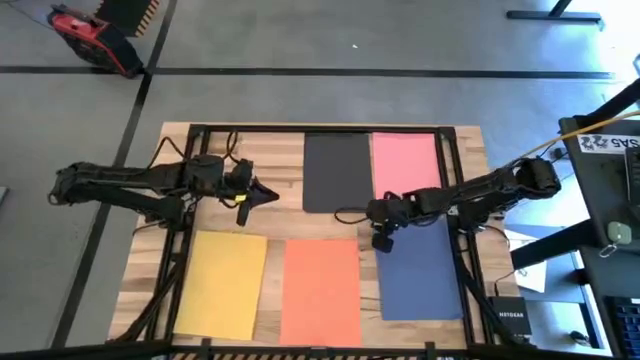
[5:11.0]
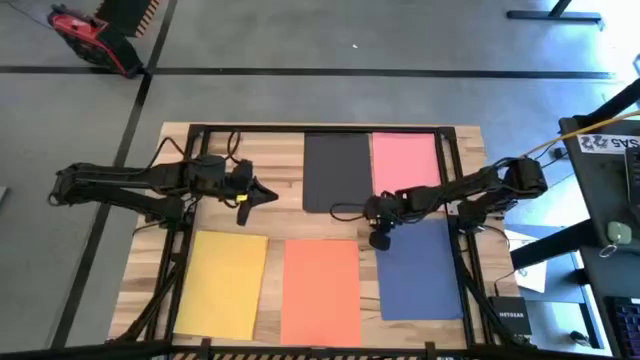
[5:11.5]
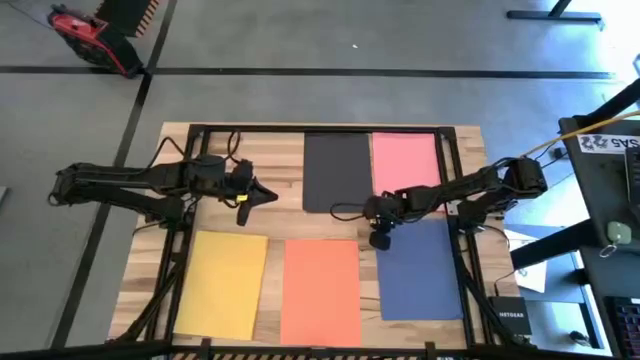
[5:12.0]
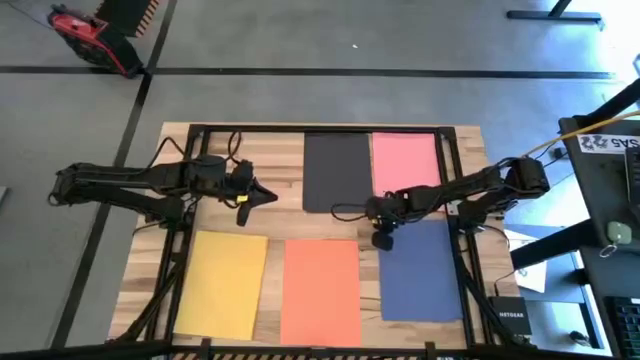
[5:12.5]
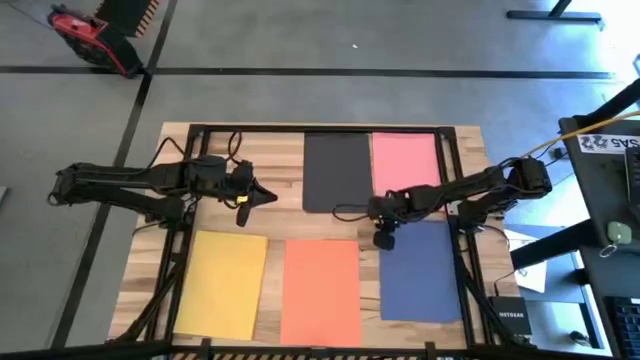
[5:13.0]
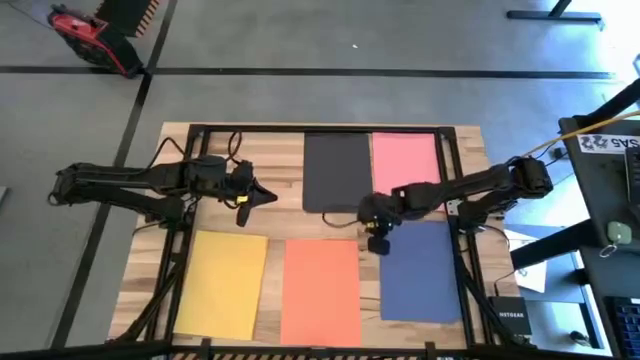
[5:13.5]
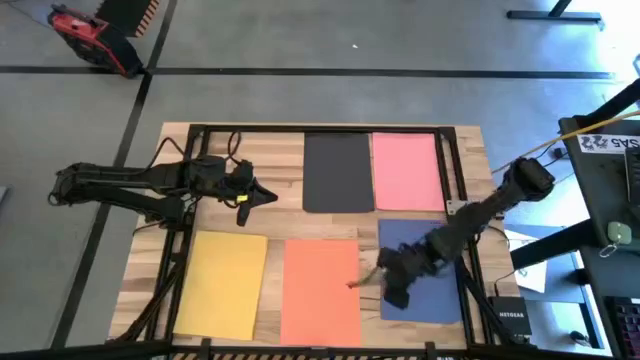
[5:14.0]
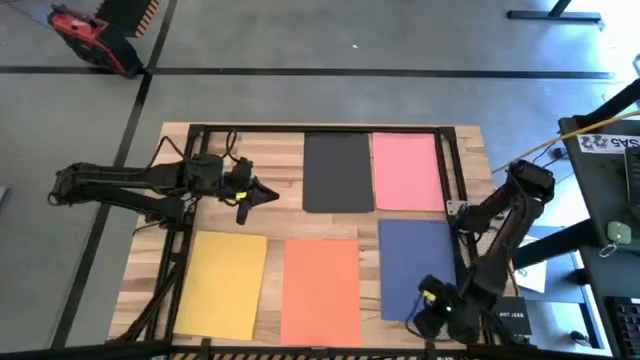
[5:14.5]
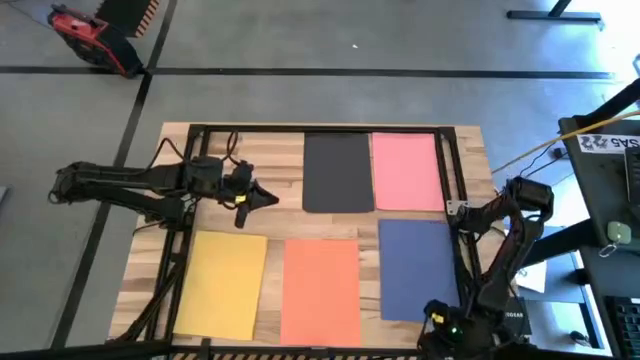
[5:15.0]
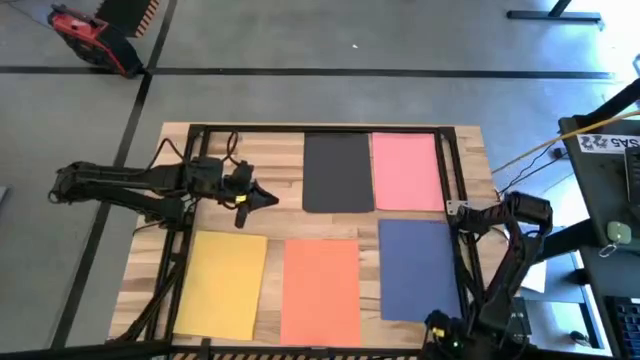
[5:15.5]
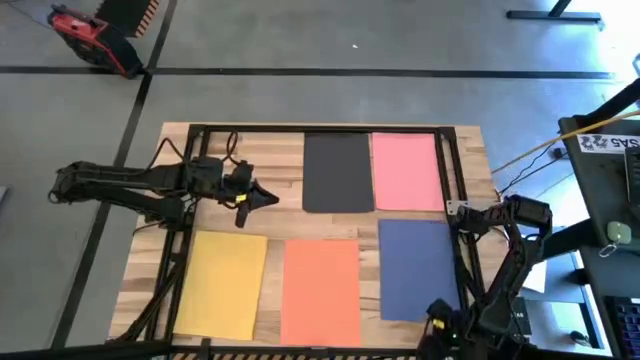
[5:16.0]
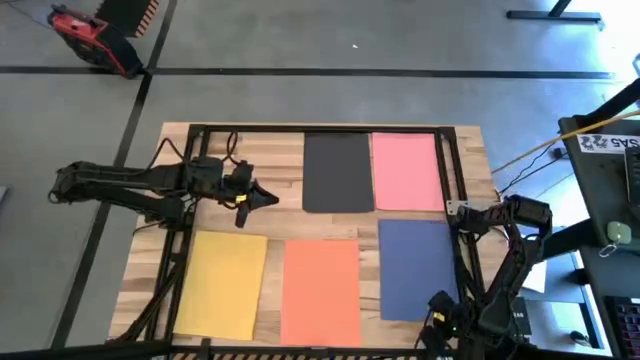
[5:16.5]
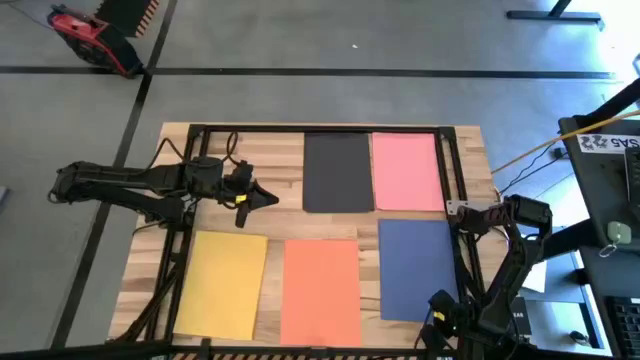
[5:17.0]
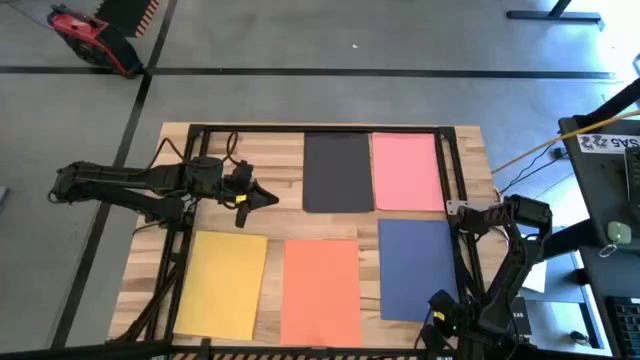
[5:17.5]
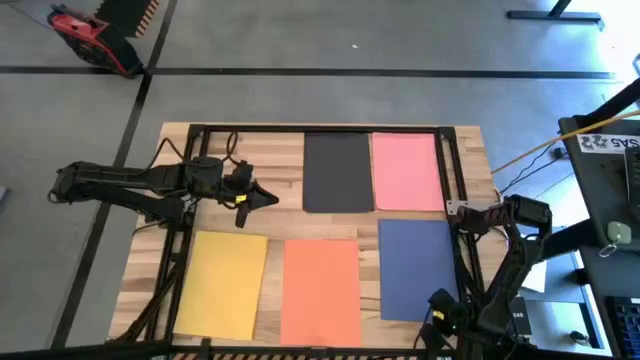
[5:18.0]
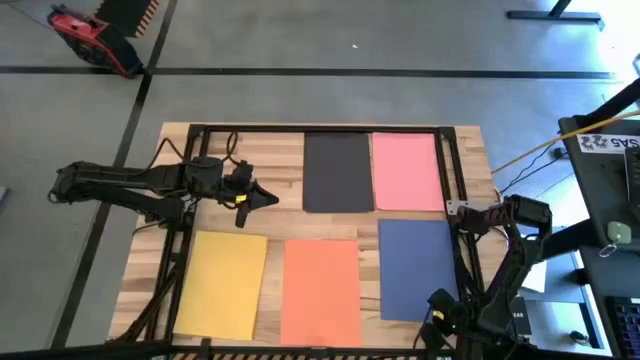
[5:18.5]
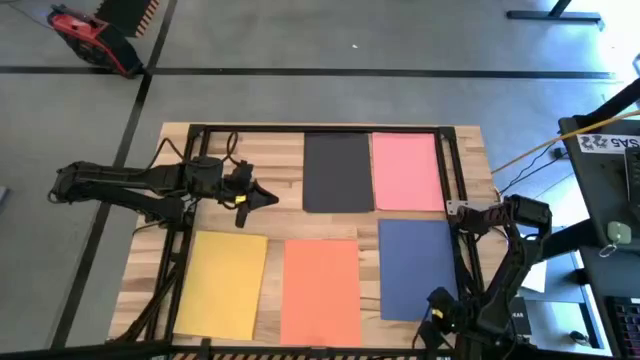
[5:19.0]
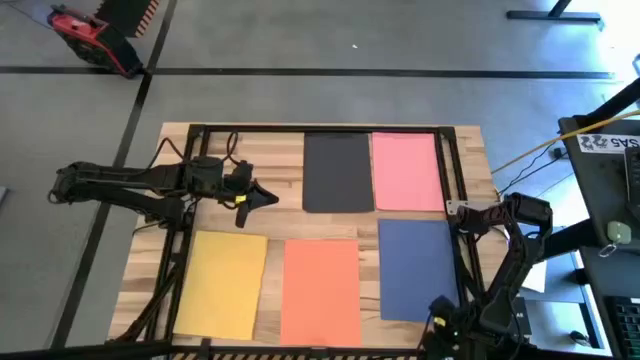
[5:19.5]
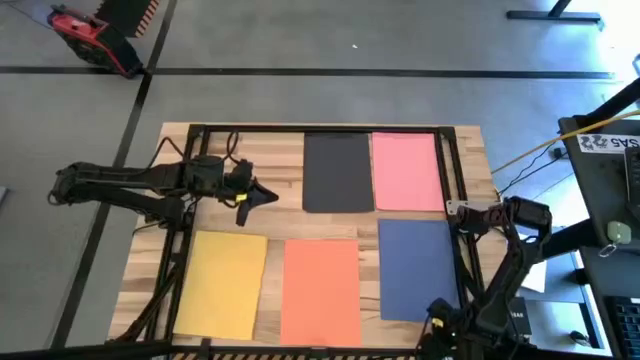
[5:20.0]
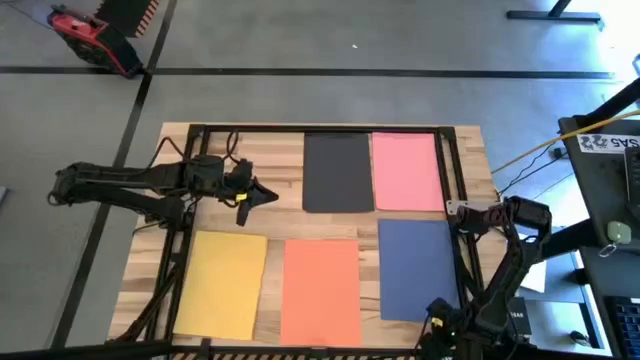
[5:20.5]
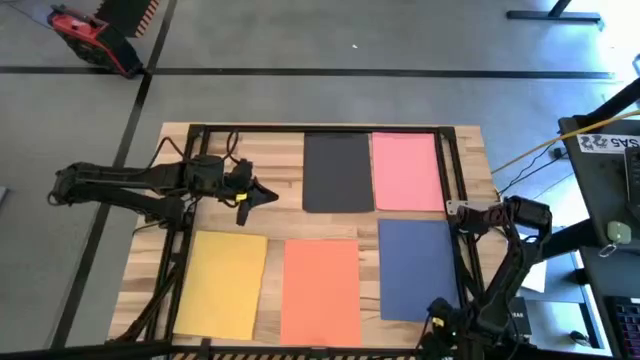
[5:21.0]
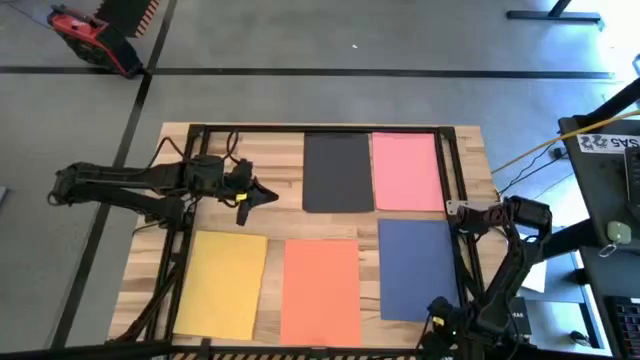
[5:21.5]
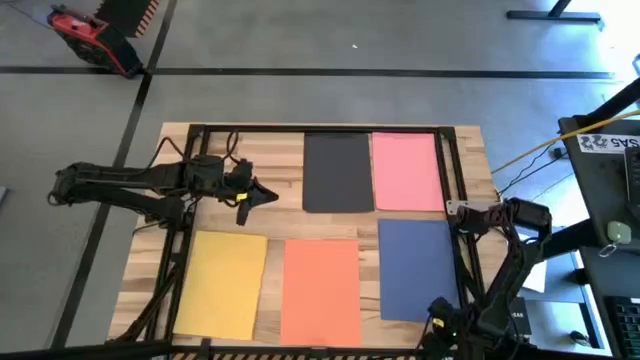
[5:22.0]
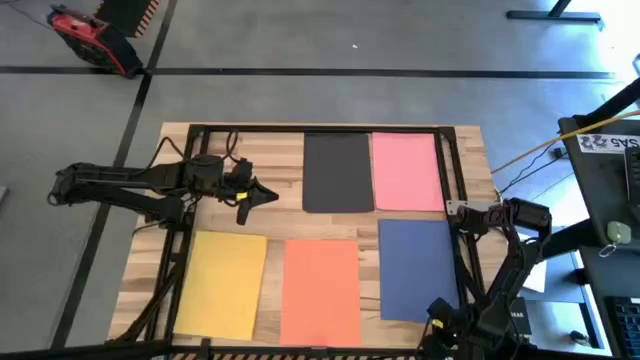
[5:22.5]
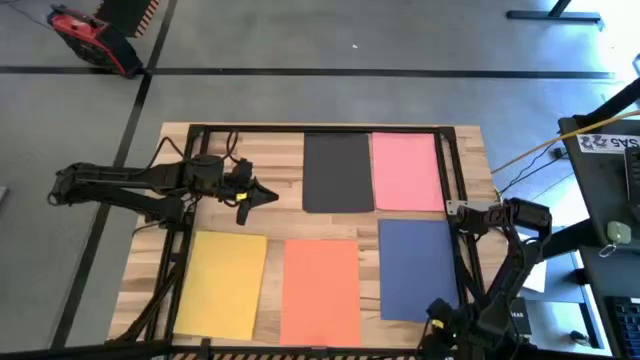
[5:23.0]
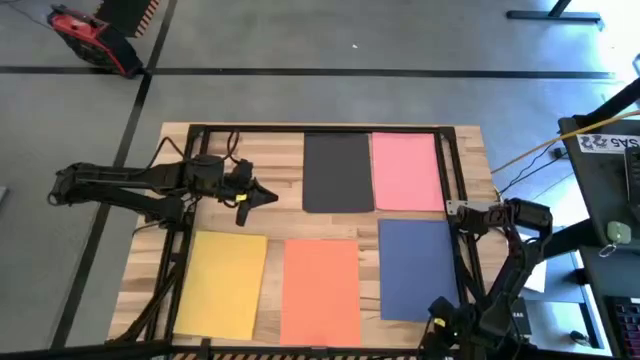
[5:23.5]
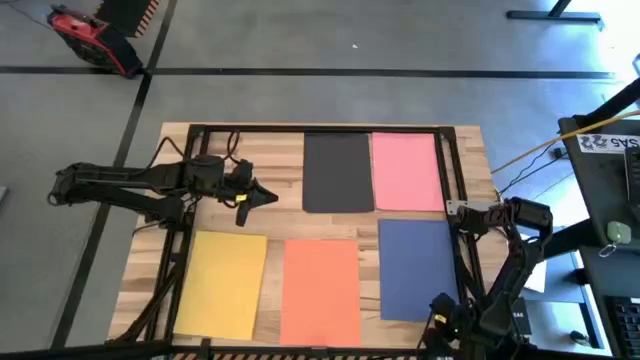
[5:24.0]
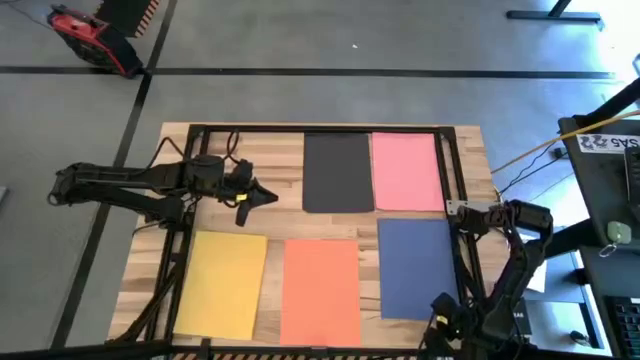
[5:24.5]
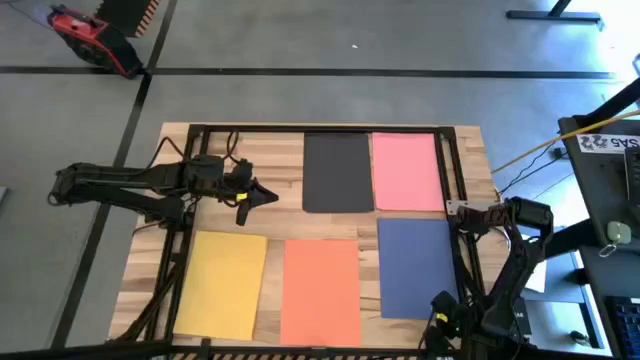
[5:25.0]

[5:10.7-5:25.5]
Task: Organize paper
Stack the blue paper on top of the stacked blue papers

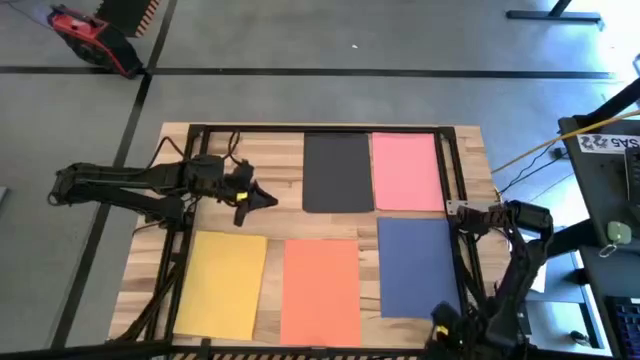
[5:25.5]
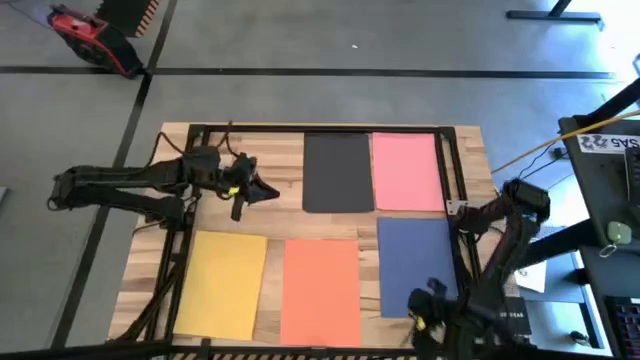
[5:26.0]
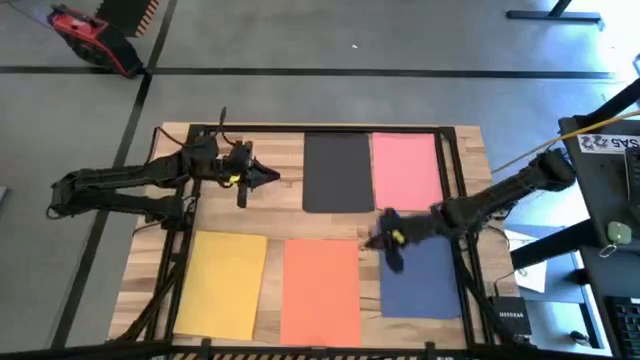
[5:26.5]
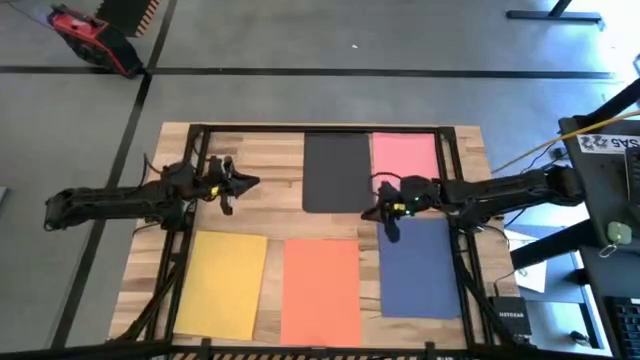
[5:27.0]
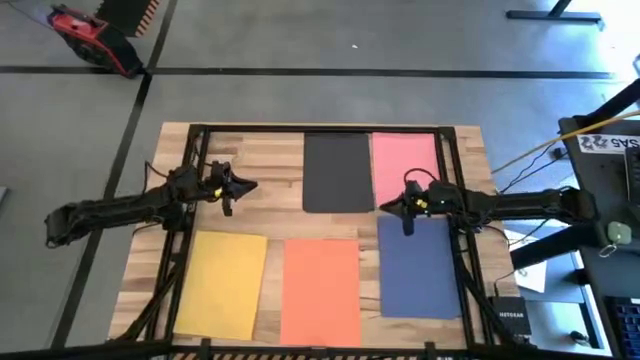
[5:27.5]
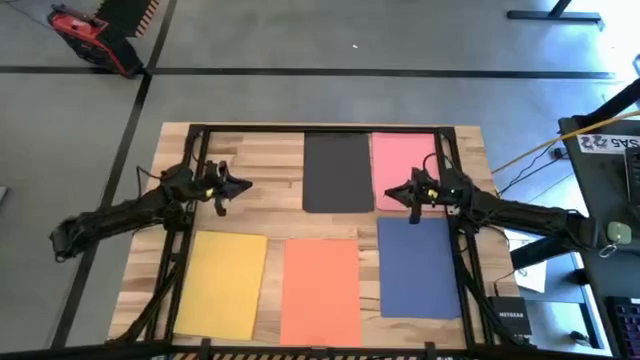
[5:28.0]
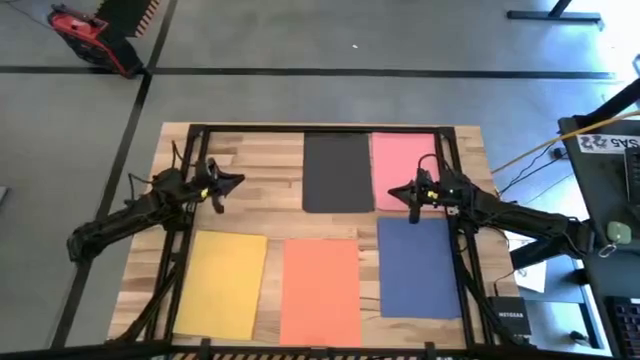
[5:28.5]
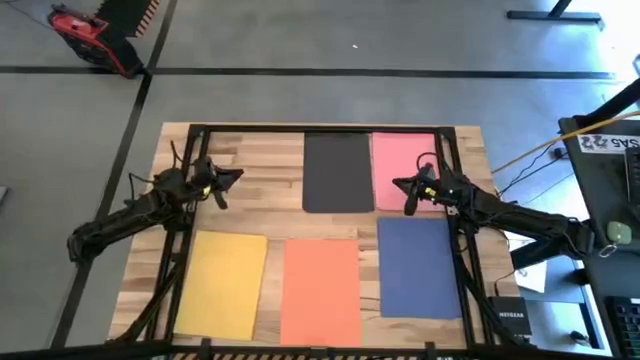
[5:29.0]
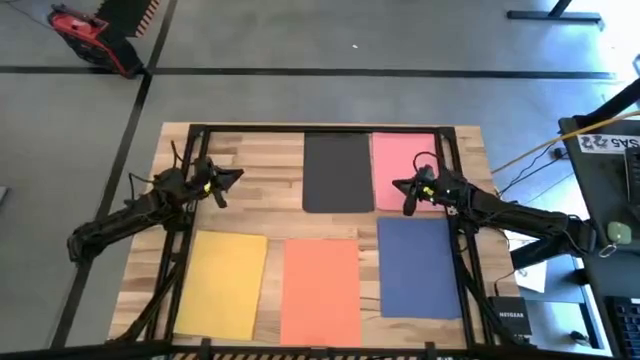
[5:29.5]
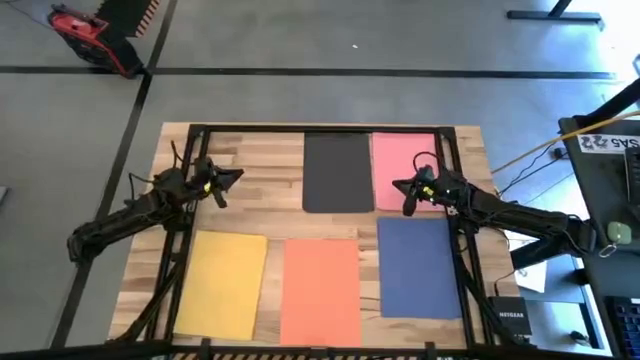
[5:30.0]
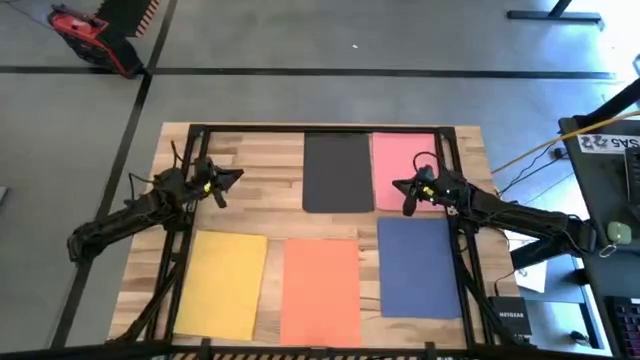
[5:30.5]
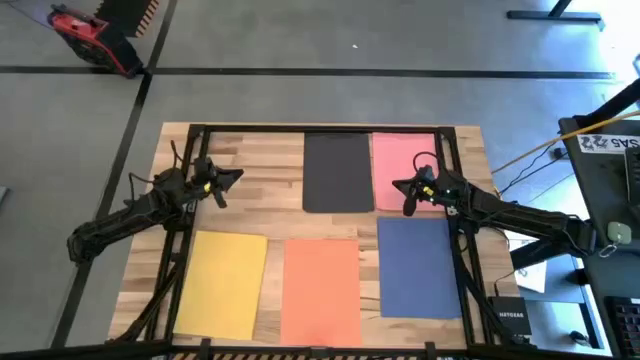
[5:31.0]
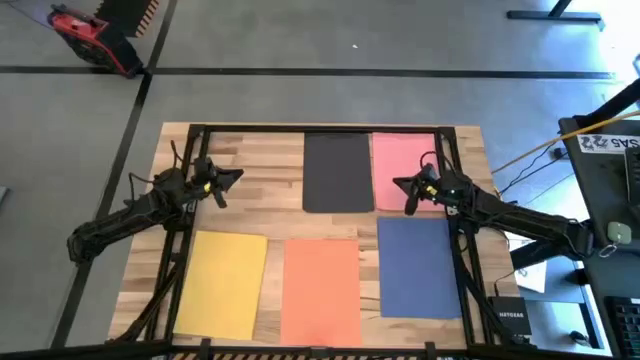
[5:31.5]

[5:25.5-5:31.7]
Return to Home Position

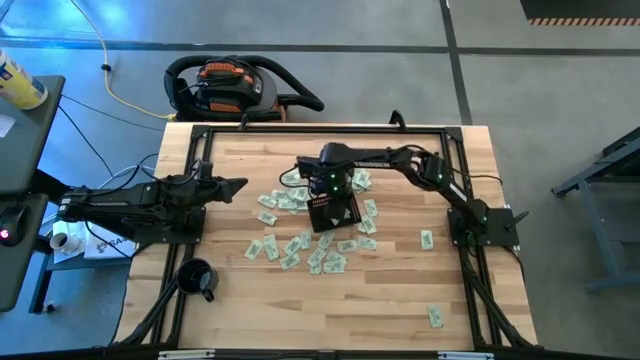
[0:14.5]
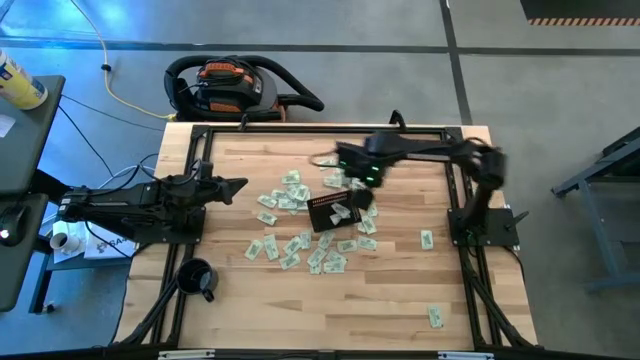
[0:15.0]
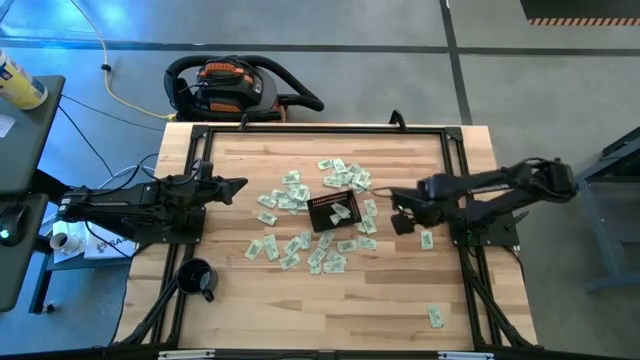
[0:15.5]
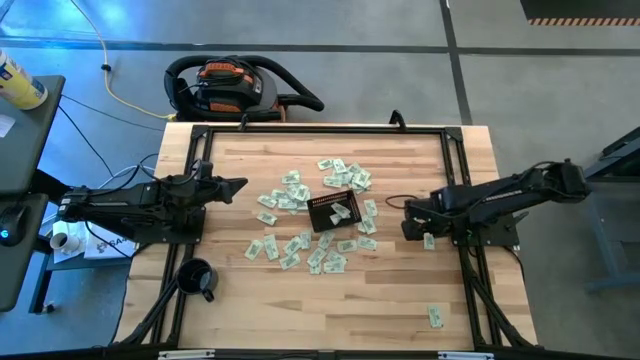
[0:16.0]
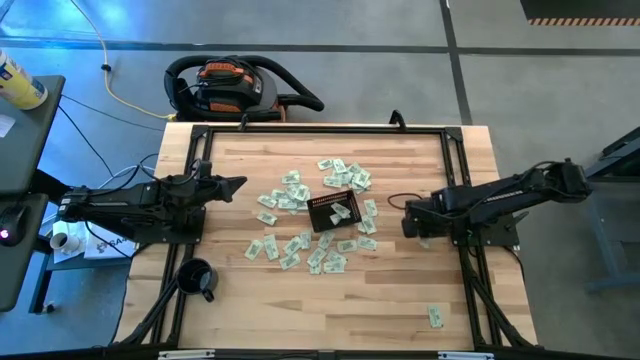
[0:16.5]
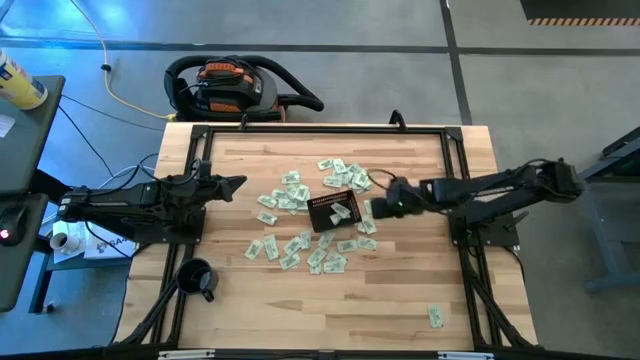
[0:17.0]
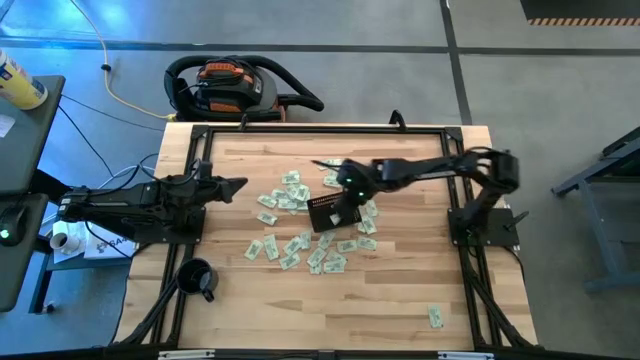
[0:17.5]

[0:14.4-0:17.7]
Task: Pick and place Stevia / Truvia into bins
Put the green stevia packet into the black bin
